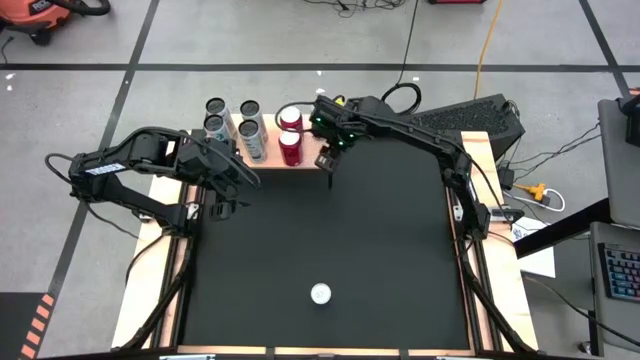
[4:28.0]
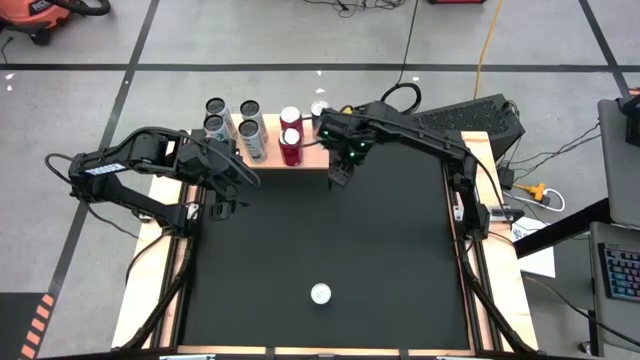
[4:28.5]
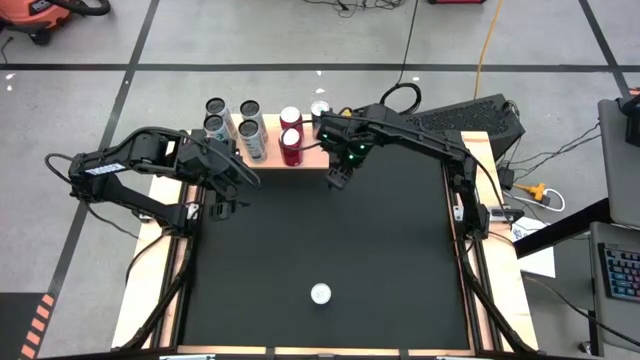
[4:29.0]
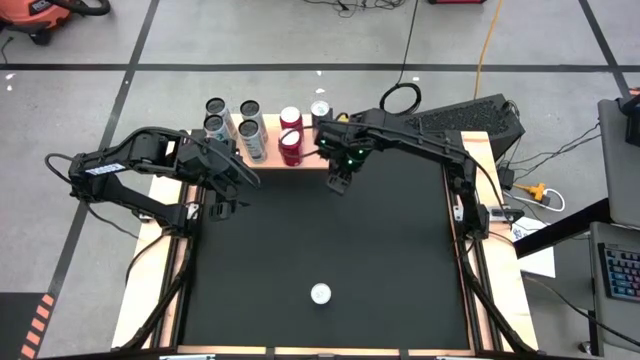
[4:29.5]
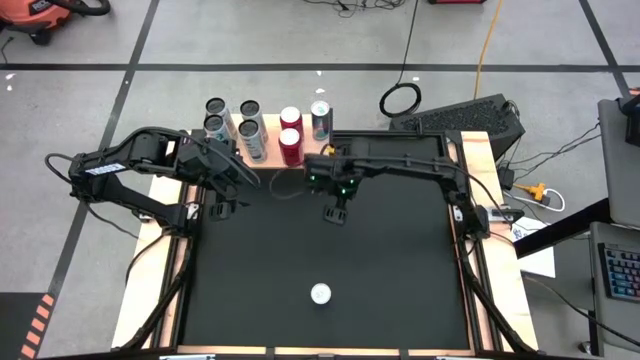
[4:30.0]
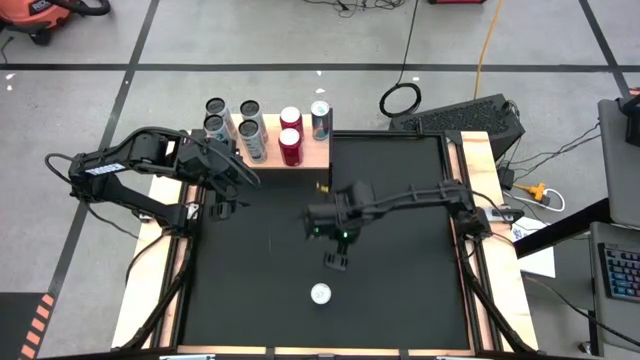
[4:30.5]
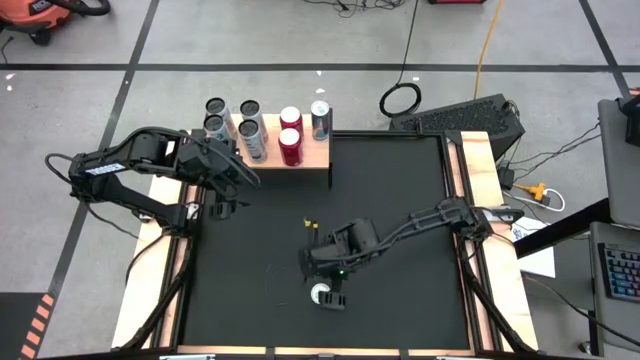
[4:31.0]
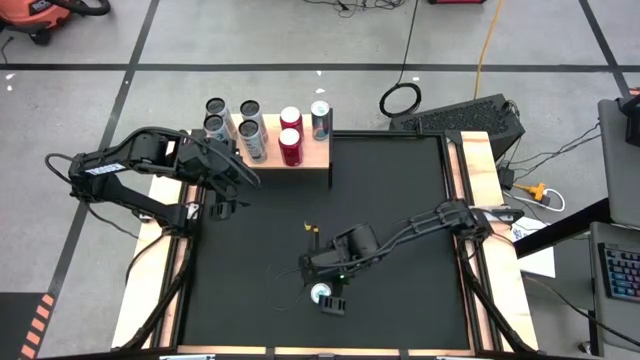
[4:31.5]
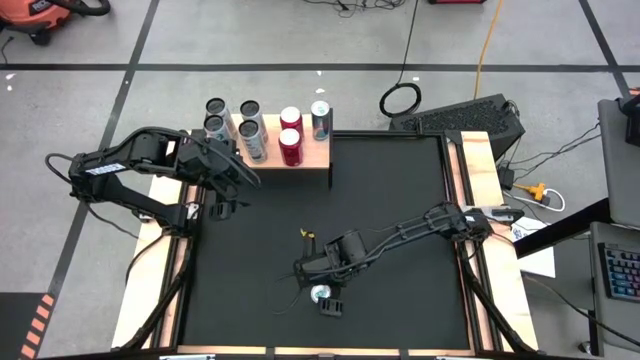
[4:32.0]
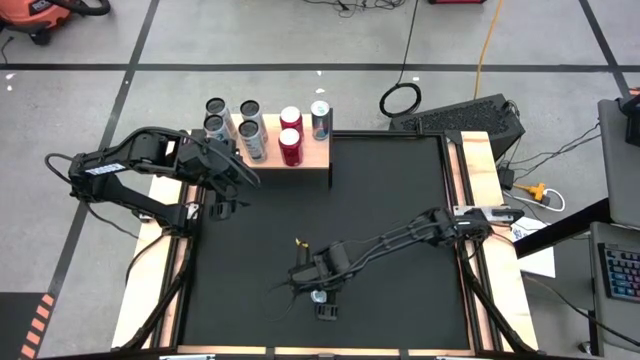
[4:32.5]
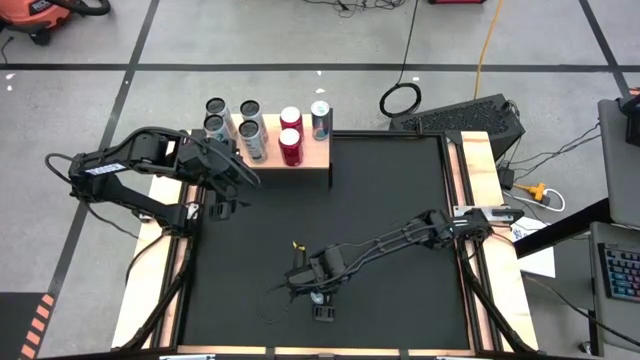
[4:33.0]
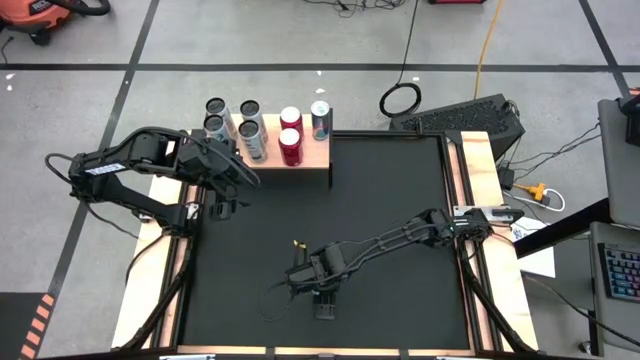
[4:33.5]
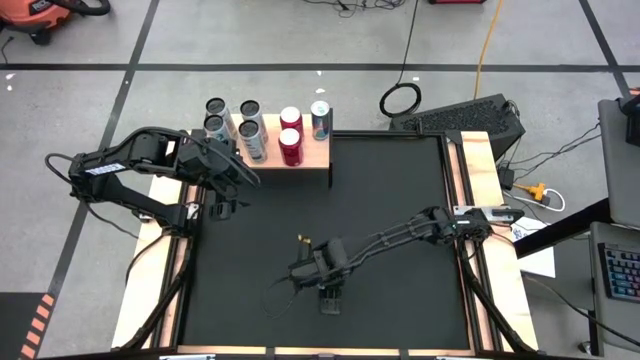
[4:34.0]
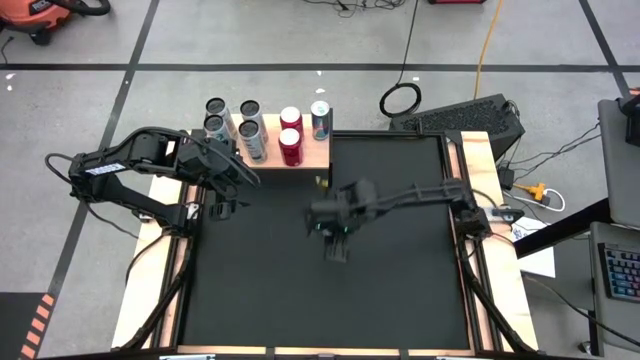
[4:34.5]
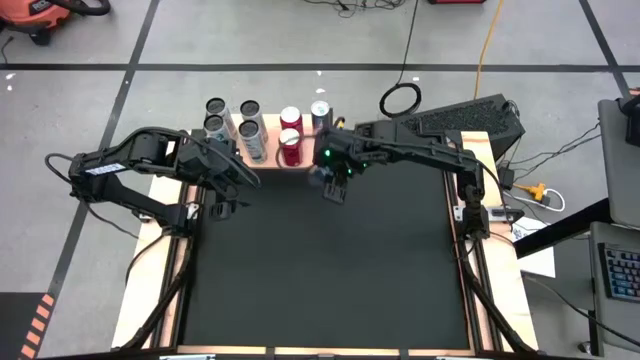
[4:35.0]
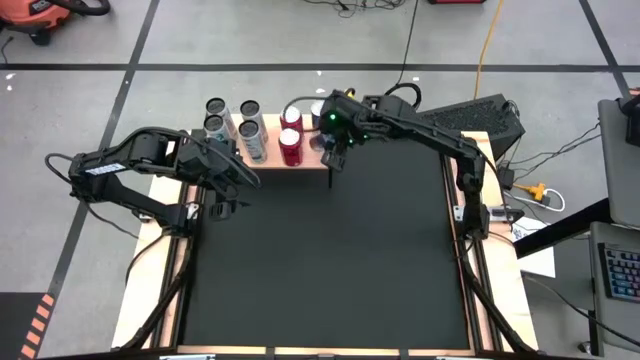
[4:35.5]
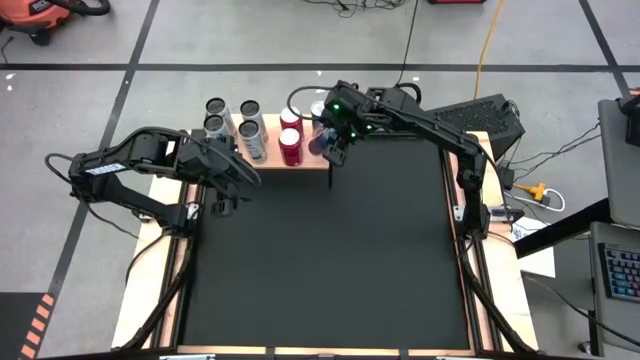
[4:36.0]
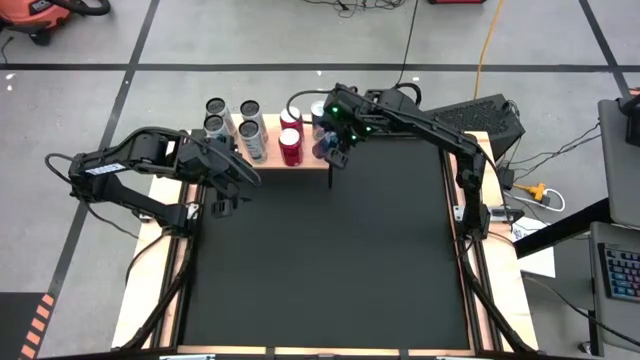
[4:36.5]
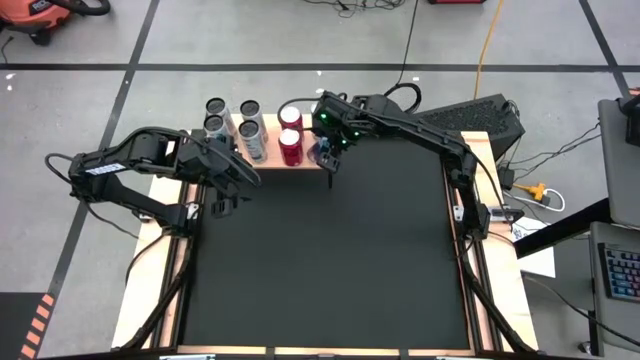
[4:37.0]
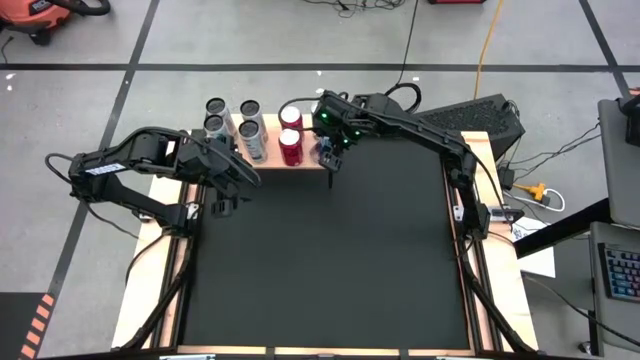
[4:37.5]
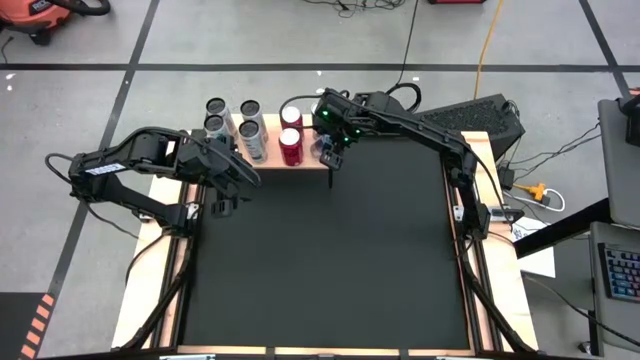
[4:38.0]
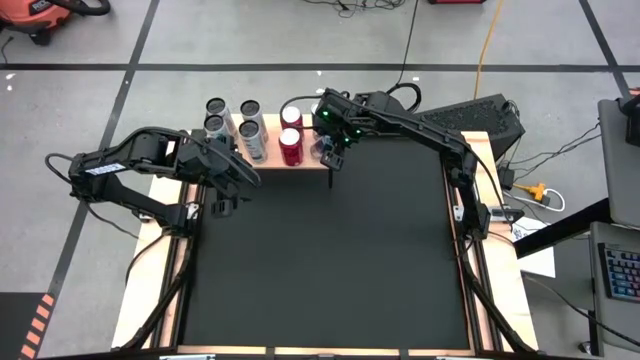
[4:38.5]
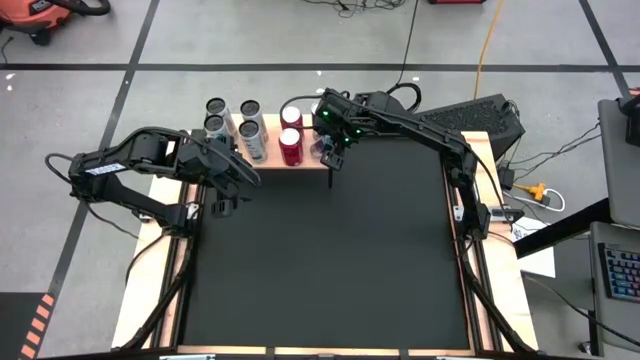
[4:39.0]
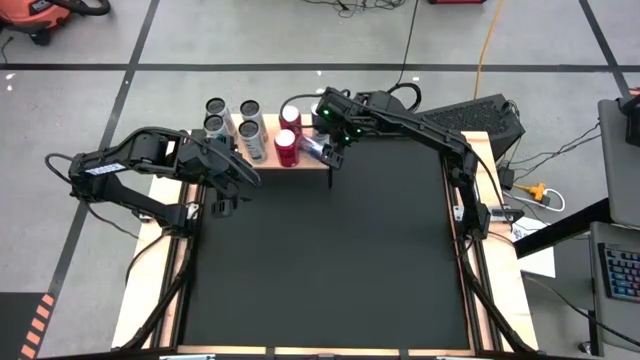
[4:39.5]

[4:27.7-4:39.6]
Task: Place canned beverage on shelf
Put the blue soda can aligned with the blue soda can on the shelf

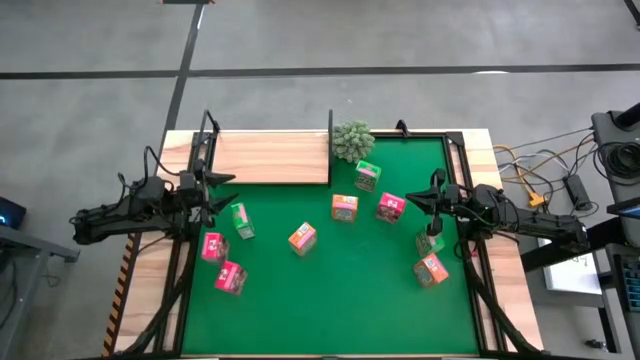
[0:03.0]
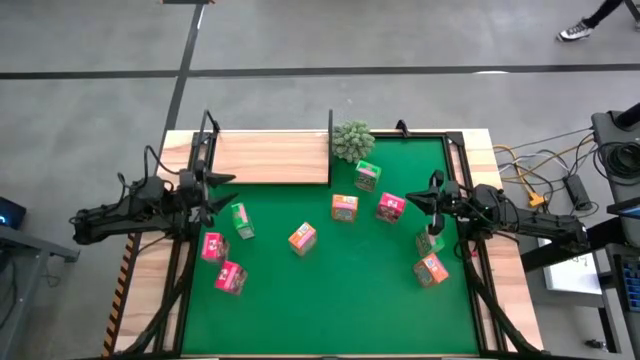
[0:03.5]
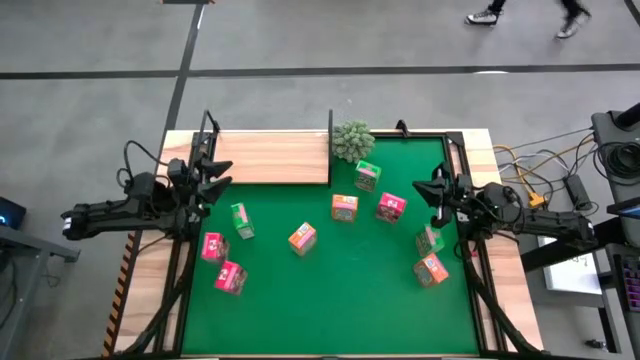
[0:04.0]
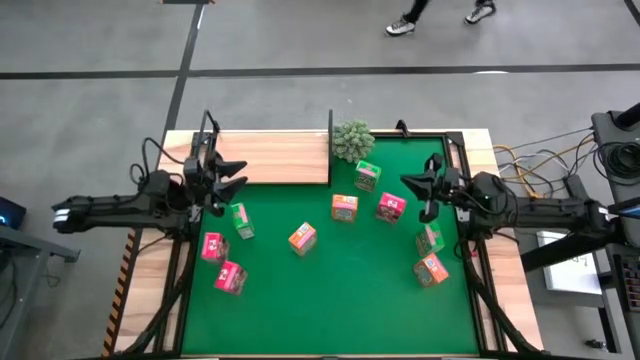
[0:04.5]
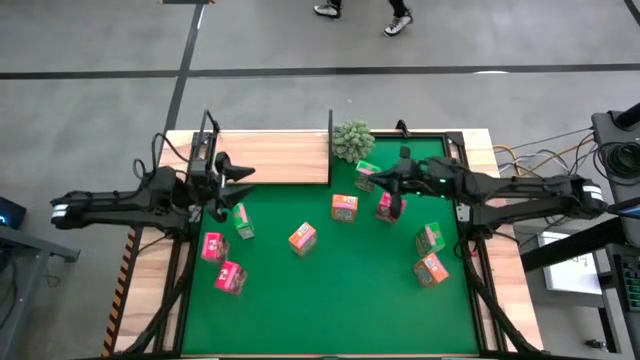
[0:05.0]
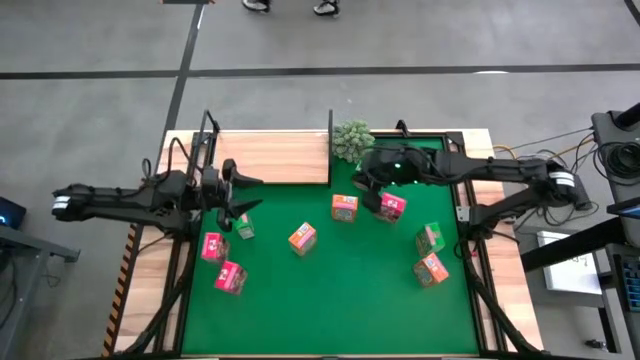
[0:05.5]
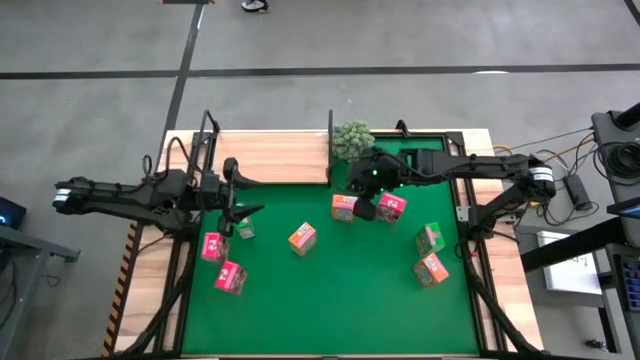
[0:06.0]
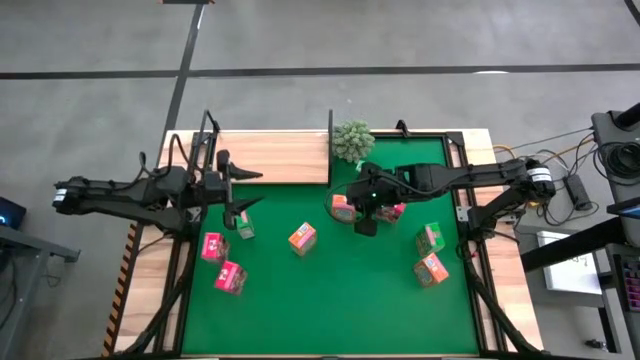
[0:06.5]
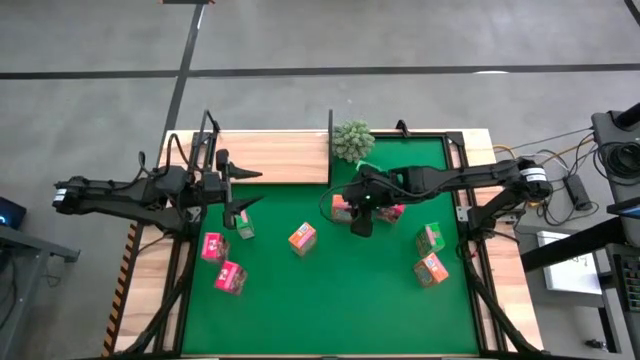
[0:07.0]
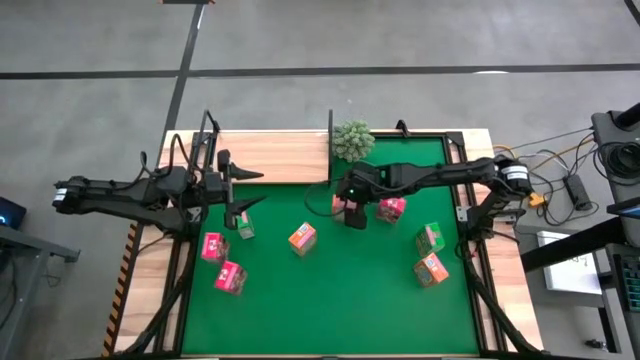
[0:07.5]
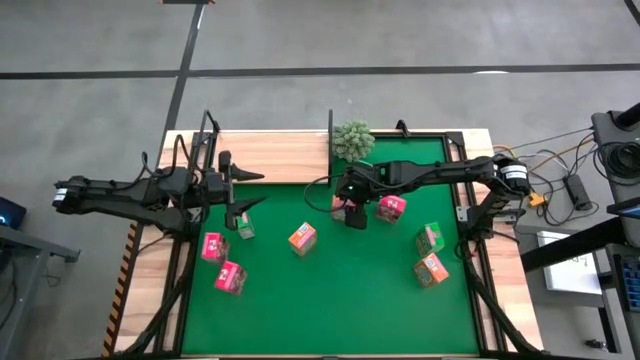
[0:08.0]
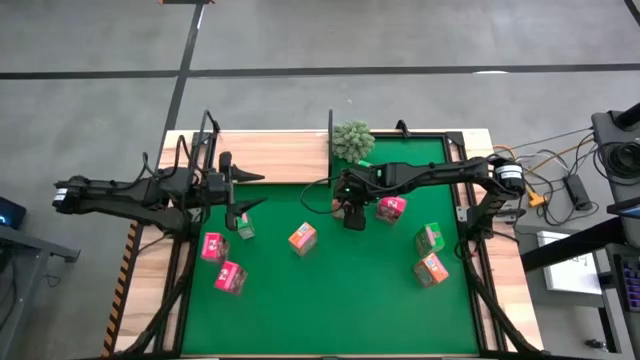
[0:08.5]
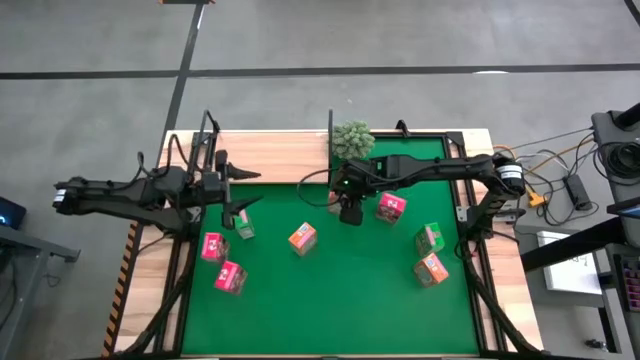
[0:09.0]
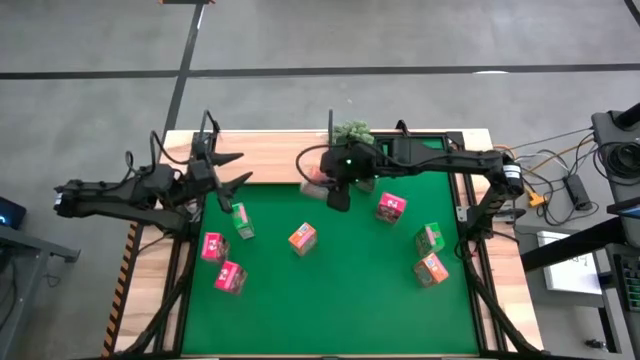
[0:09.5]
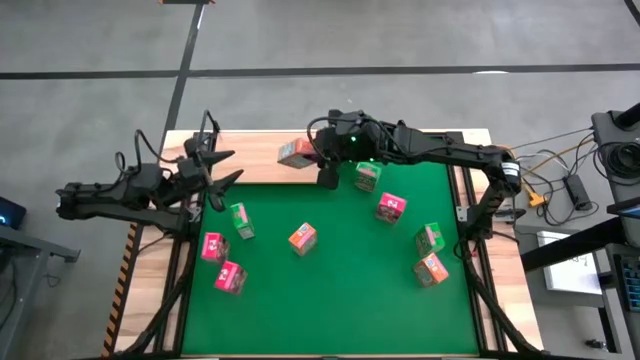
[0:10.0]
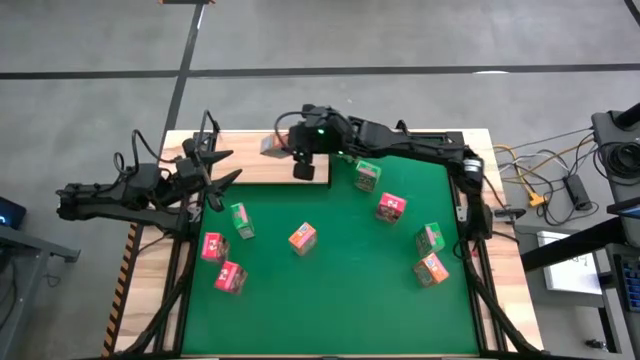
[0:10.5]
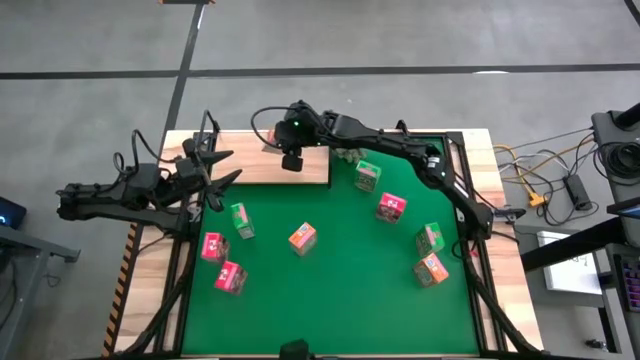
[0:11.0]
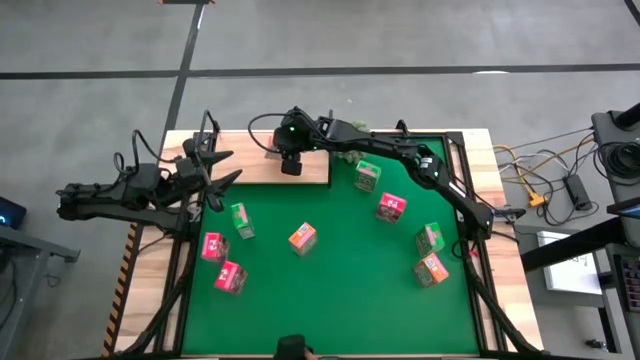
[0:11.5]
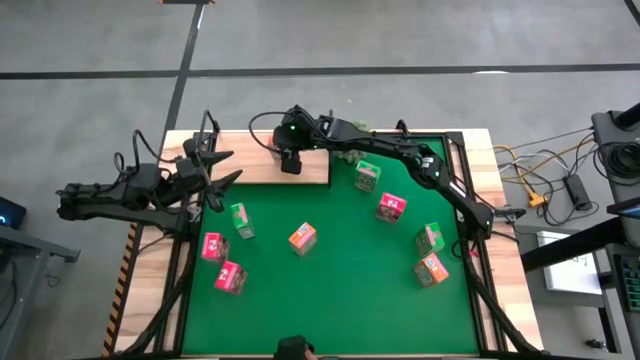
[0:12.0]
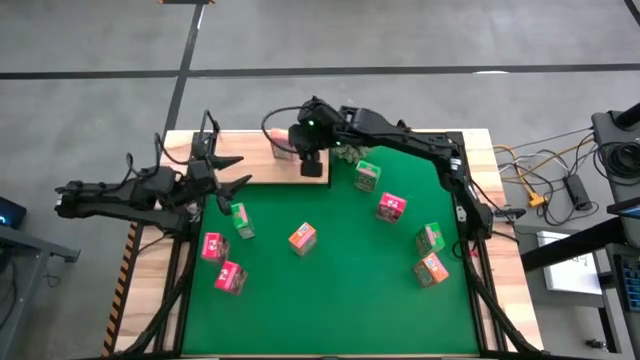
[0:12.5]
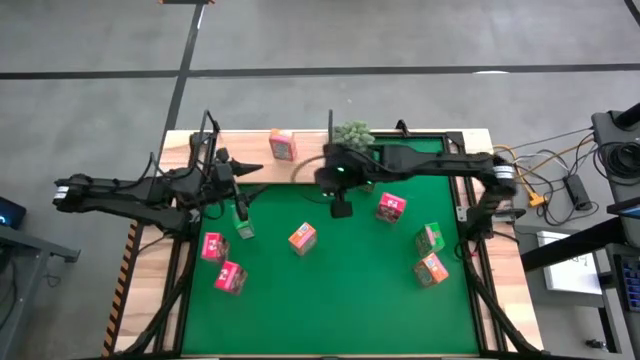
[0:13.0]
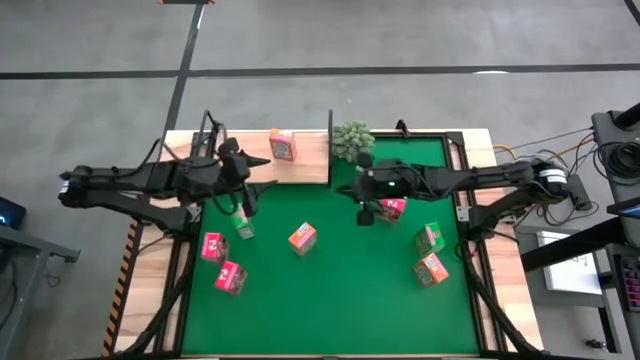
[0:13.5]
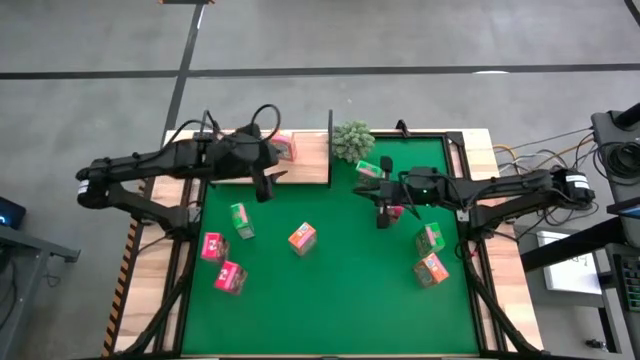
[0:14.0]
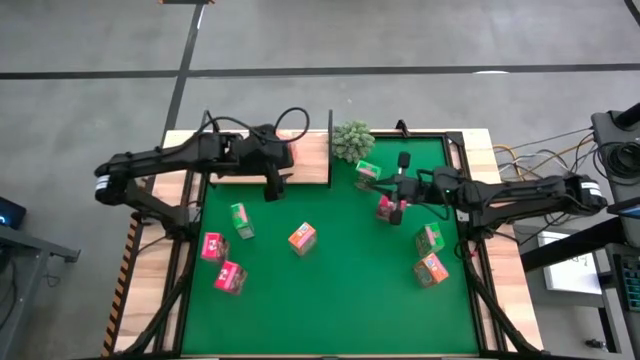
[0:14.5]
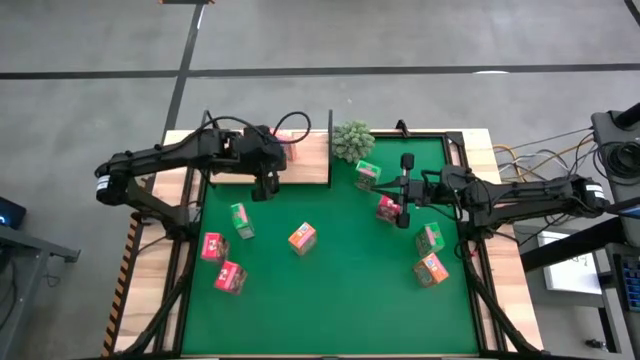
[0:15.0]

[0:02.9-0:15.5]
Task: Stack cereal on shelf
Put the top orange cereal box on the shelf
